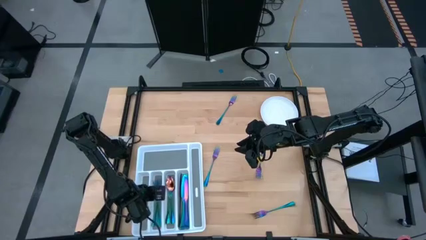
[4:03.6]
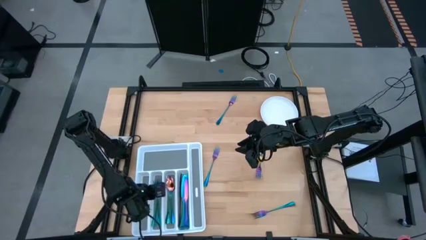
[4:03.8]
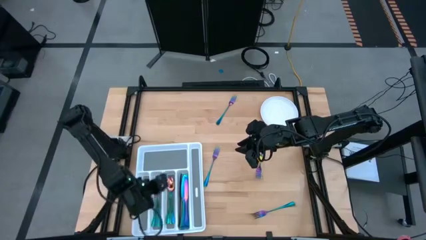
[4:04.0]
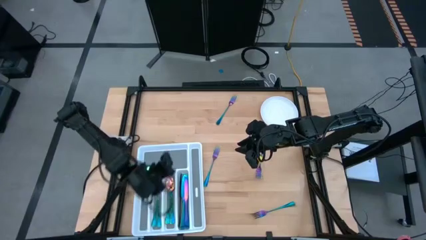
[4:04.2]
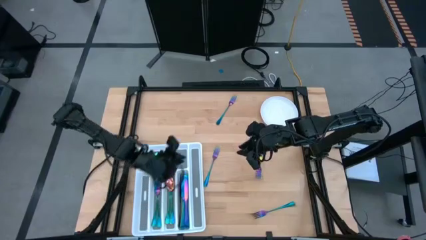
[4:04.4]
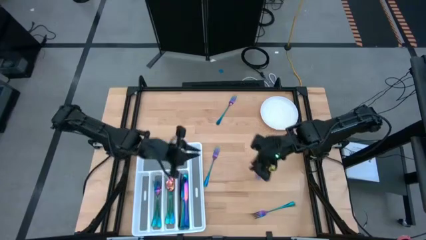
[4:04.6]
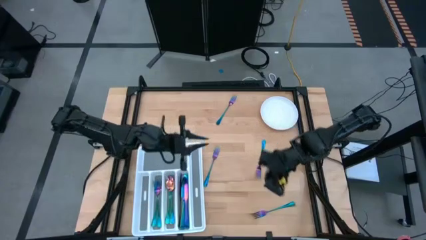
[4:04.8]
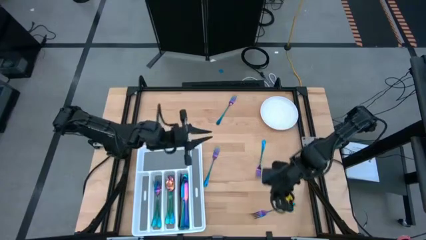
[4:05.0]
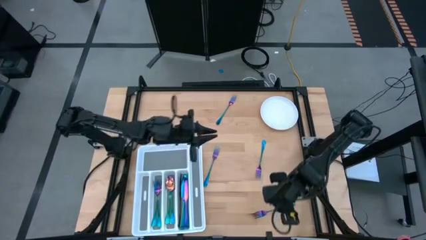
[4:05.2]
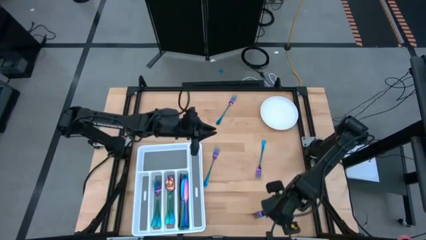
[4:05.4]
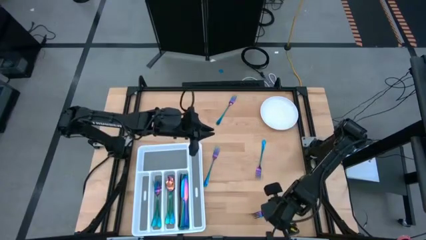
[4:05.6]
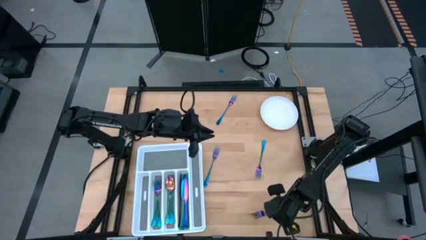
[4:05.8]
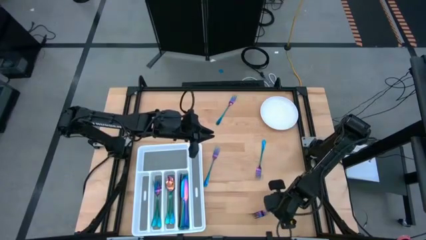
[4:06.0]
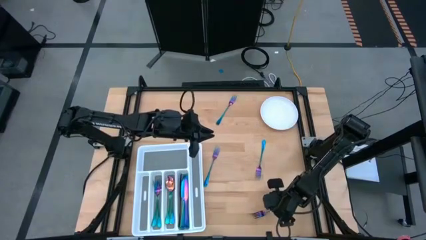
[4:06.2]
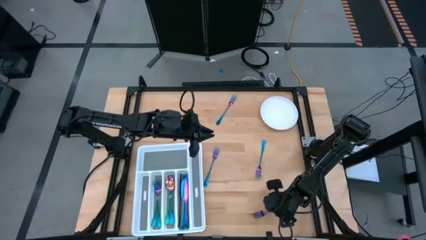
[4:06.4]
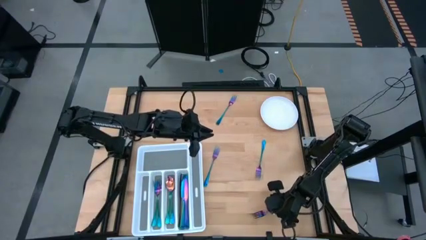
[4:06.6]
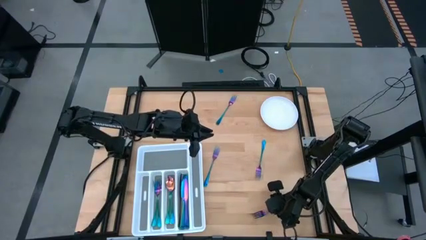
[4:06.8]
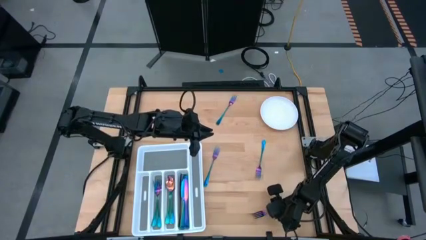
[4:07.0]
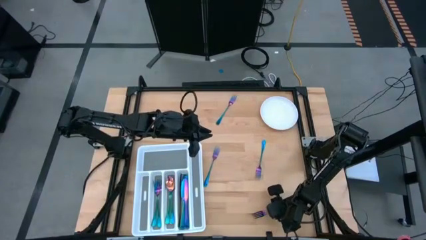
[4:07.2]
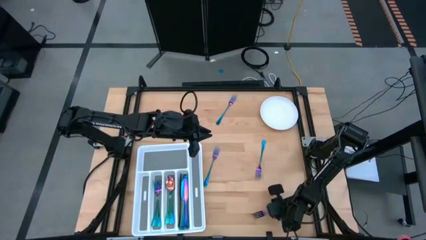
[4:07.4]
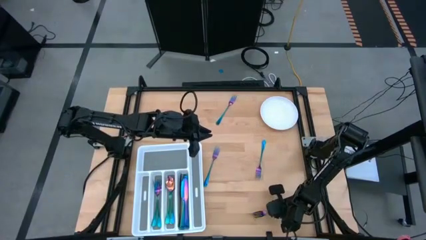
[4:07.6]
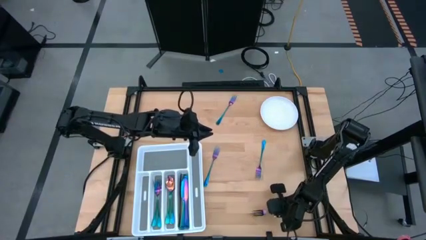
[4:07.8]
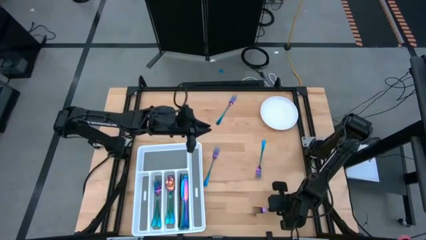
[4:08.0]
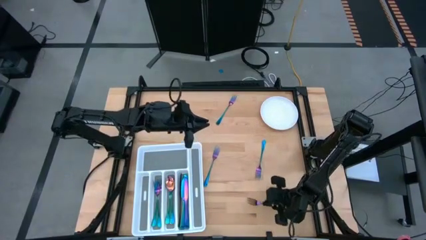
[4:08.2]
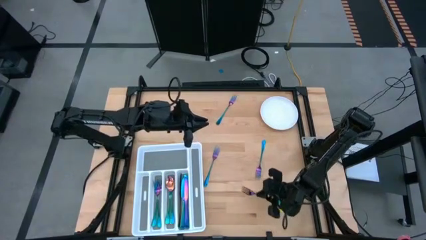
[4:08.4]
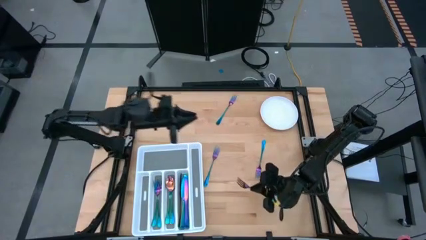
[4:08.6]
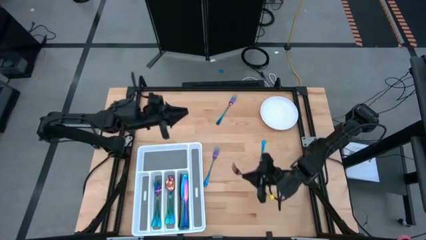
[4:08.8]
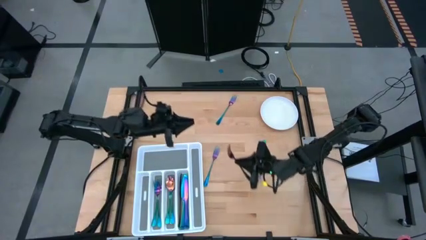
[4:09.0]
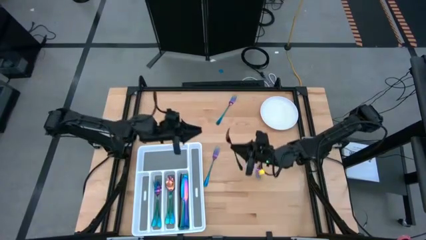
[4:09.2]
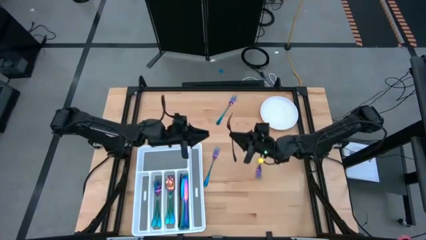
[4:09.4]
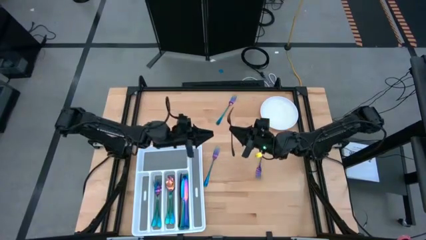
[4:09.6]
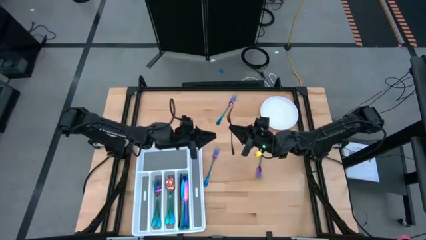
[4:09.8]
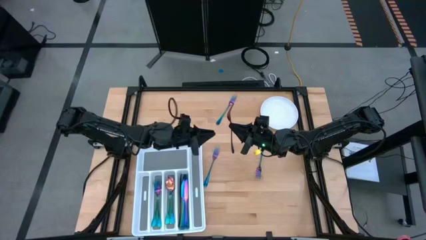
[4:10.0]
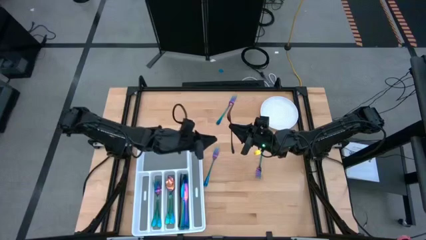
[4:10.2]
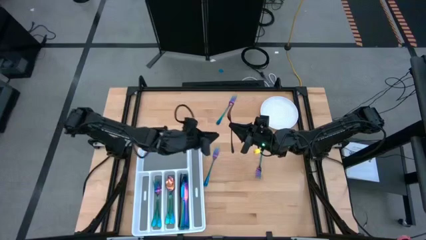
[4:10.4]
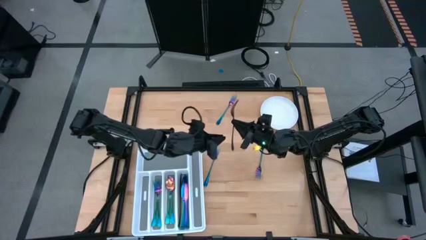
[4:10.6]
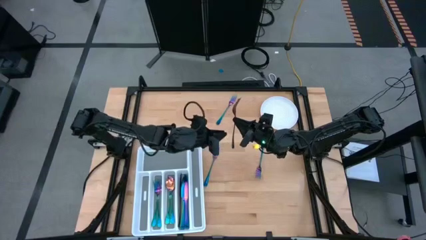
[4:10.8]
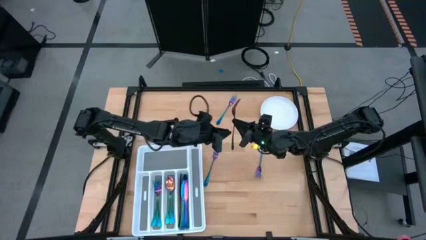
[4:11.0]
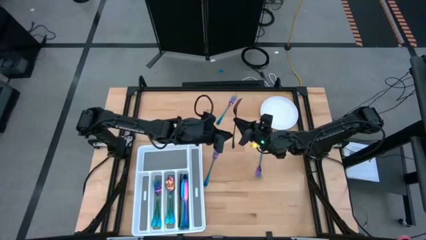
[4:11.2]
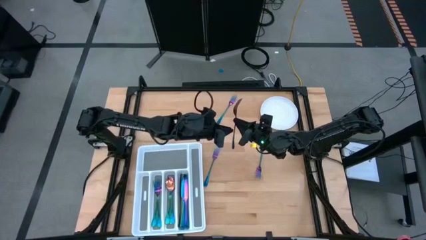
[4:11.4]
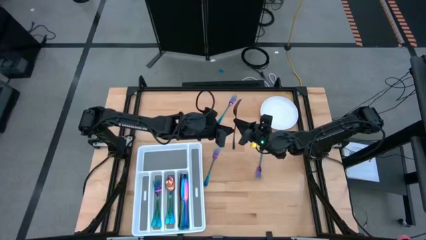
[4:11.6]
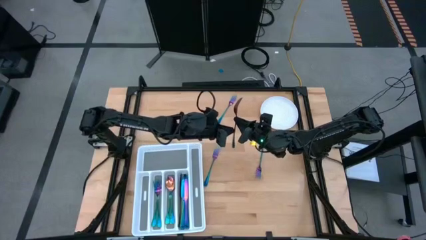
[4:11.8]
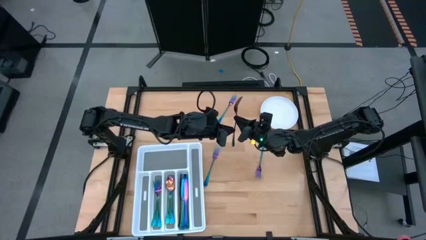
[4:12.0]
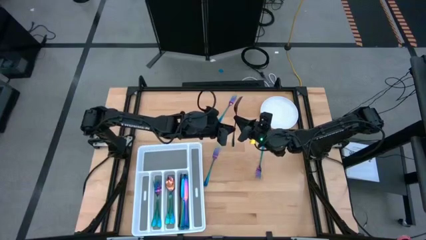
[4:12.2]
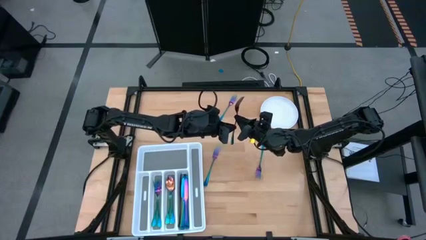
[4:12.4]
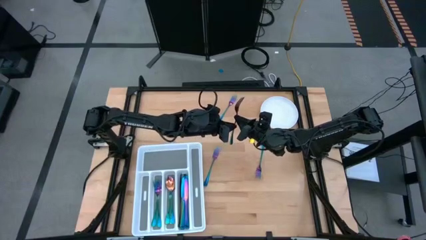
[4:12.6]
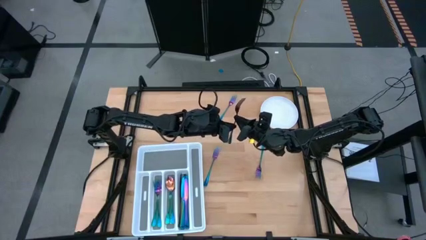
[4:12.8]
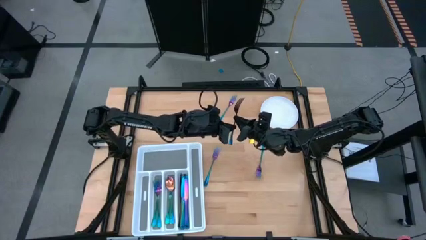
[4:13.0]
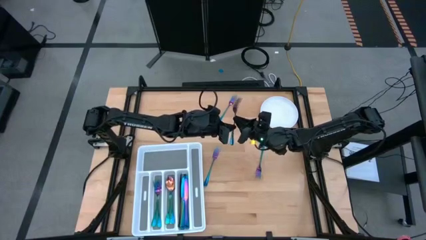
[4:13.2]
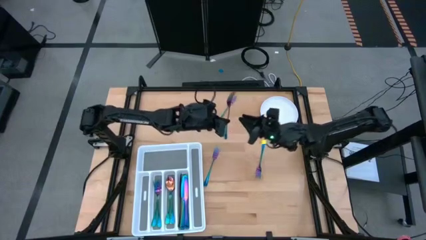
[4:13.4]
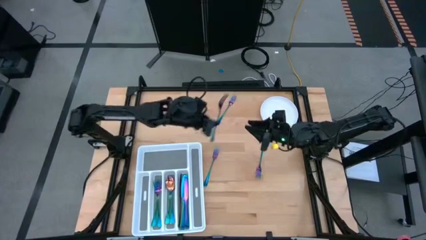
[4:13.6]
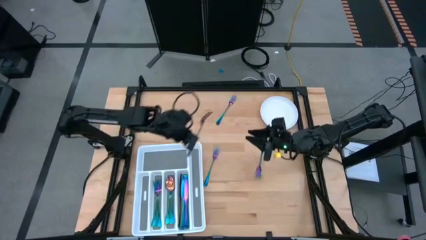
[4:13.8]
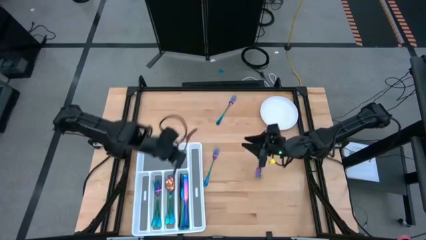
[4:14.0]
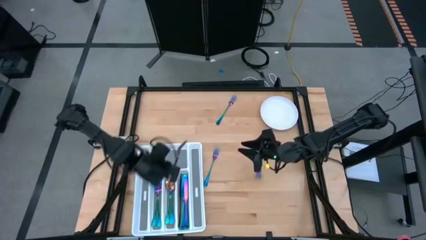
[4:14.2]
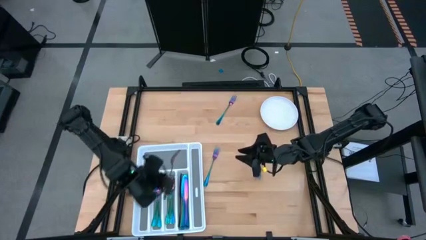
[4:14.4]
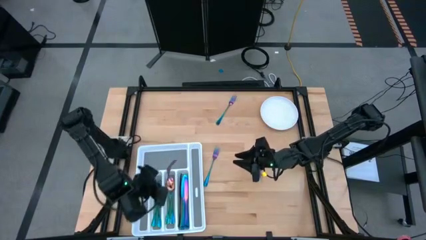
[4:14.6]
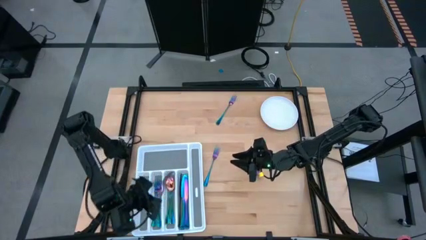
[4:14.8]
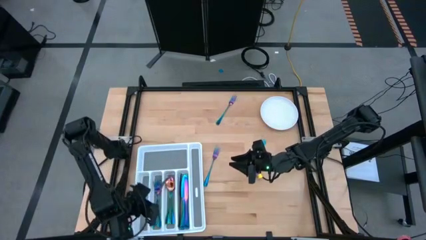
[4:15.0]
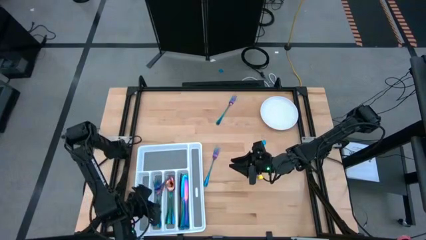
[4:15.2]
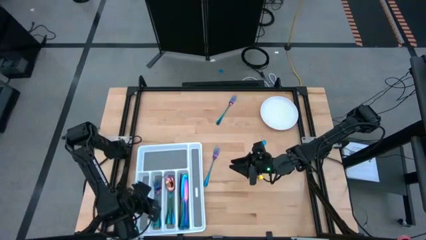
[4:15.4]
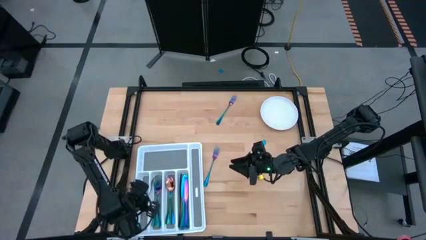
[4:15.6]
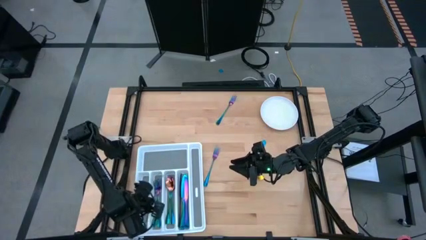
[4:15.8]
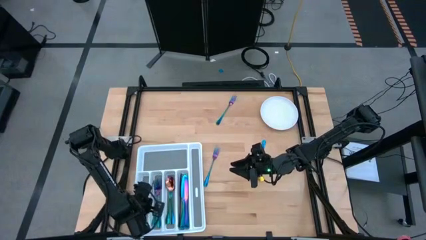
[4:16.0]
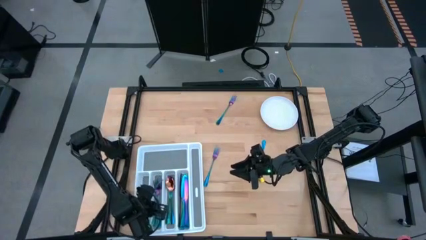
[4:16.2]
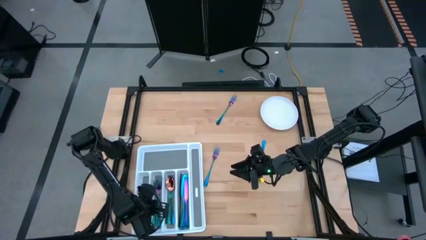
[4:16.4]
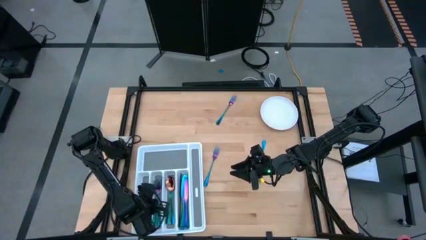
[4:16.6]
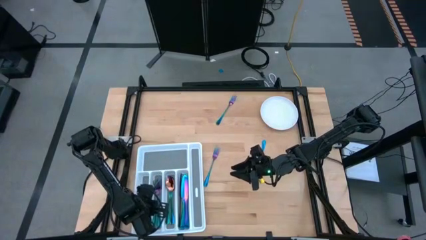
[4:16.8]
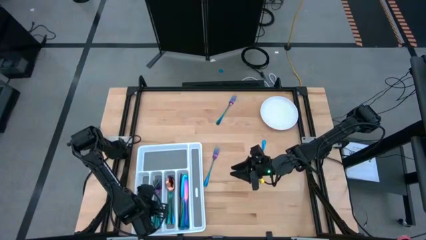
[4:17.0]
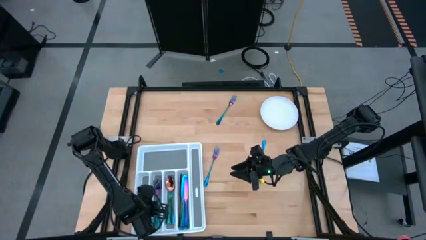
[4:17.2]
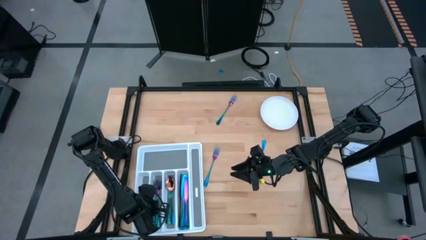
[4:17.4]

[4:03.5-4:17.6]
Task: Sort silverware
Put the bottom right iridescent fork into the cutlery tray

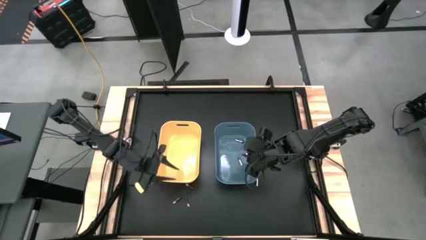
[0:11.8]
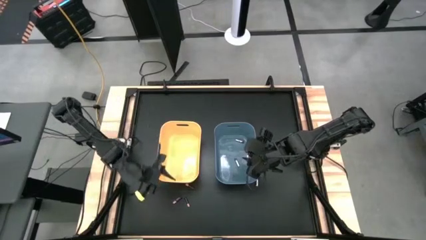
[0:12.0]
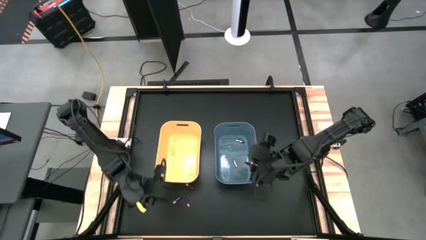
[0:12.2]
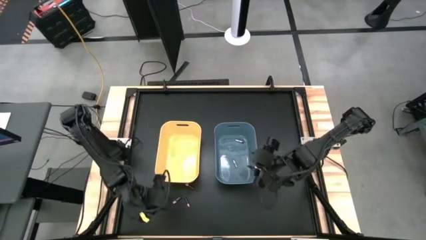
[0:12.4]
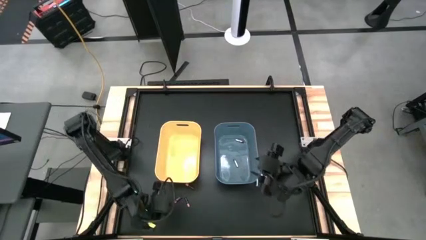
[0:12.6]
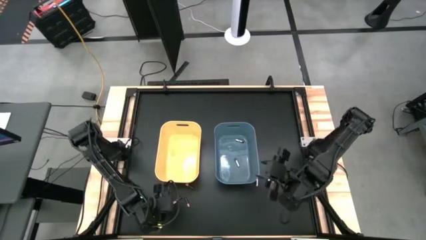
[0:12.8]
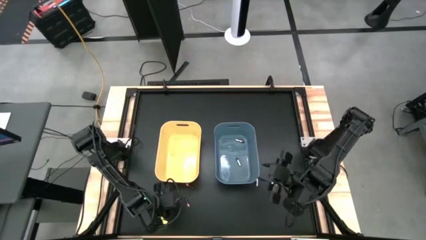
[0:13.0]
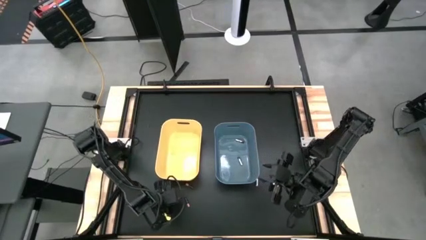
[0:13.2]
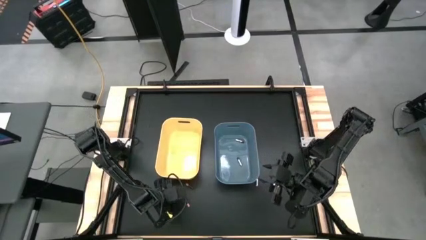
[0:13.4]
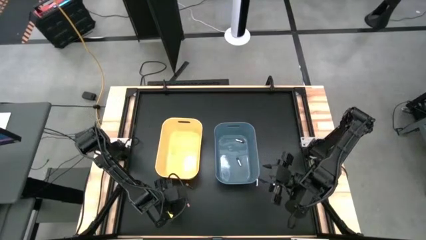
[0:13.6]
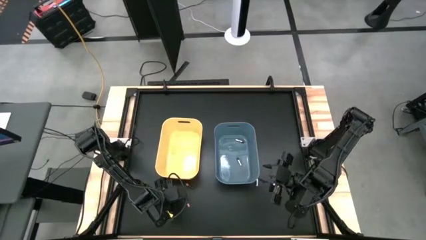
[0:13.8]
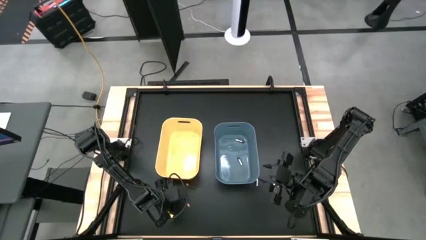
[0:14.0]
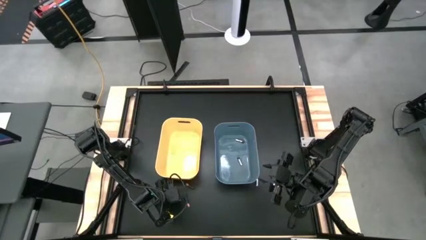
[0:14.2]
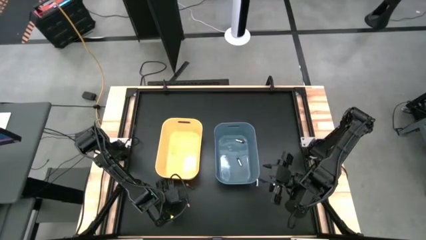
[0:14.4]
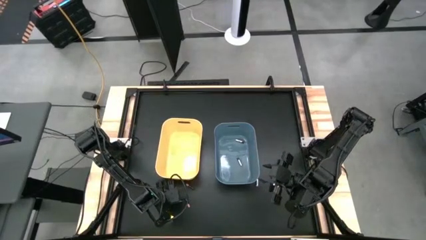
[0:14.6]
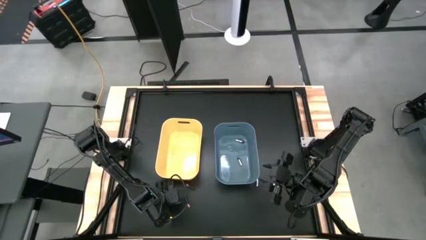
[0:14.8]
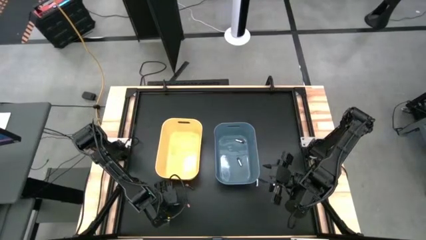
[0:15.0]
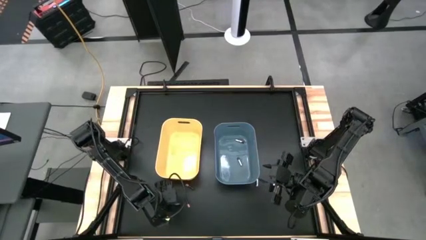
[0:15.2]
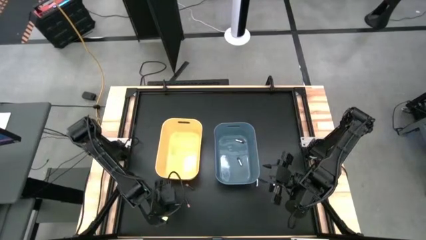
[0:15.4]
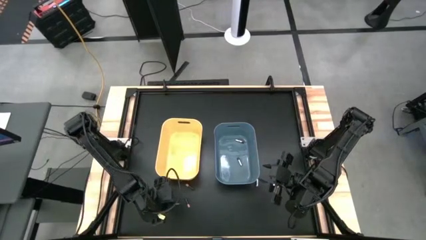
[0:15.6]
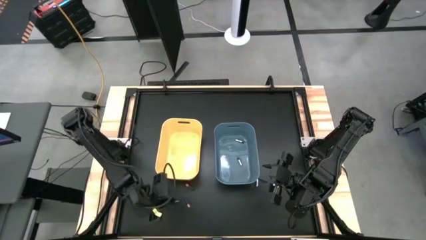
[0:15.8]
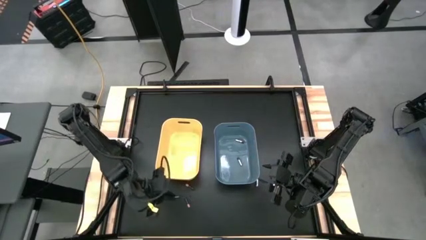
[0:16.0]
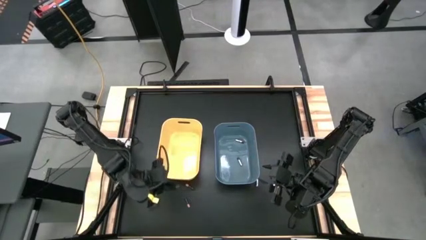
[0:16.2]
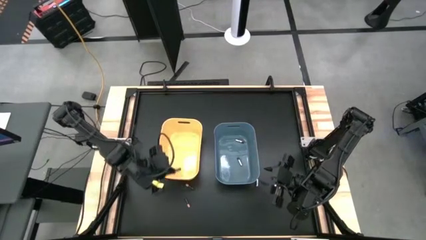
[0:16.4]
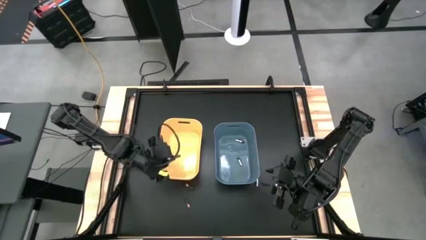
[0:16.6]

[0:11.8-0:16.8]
Task: Sort batteries
Put the bottom left black battery into the yellow bin
